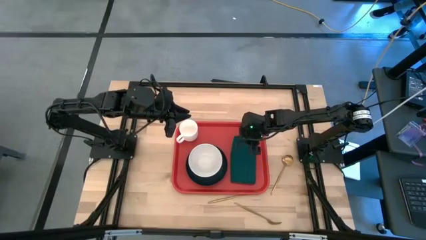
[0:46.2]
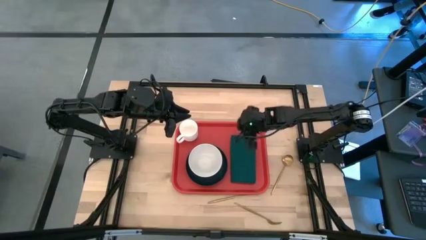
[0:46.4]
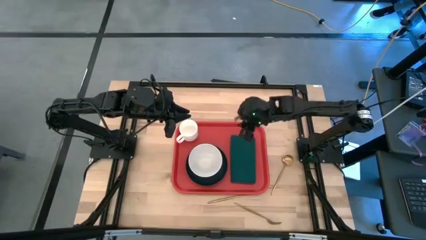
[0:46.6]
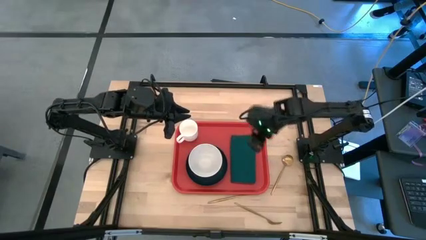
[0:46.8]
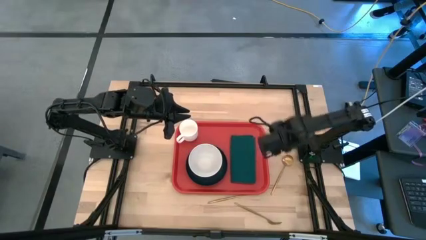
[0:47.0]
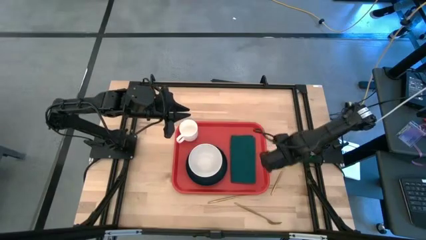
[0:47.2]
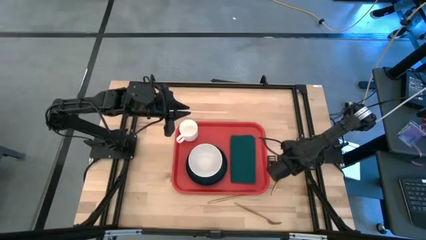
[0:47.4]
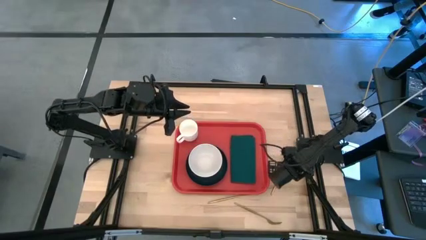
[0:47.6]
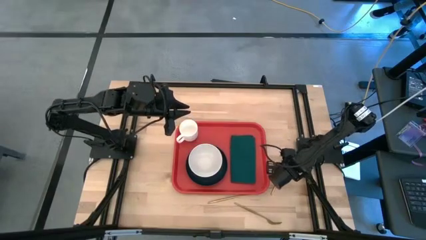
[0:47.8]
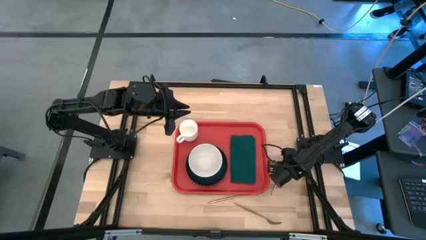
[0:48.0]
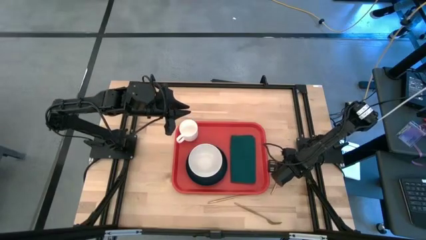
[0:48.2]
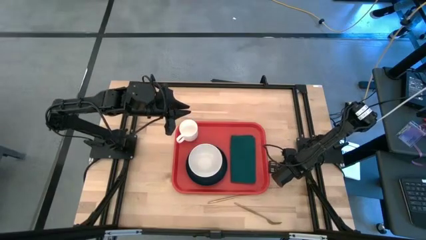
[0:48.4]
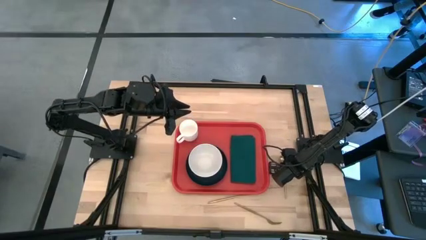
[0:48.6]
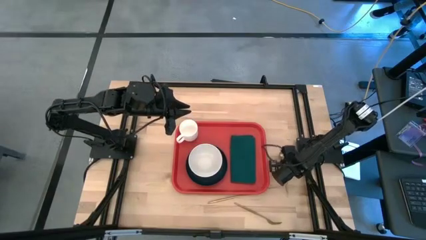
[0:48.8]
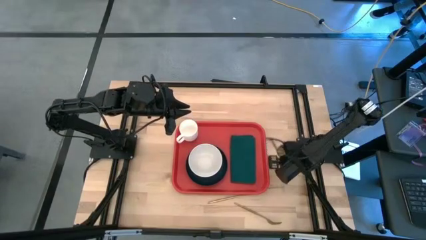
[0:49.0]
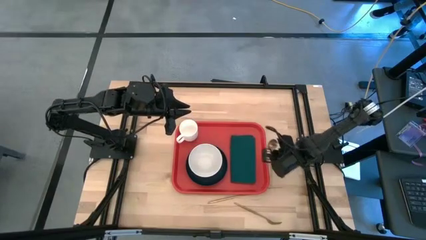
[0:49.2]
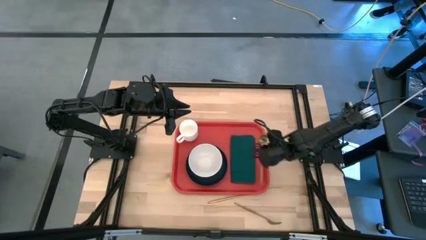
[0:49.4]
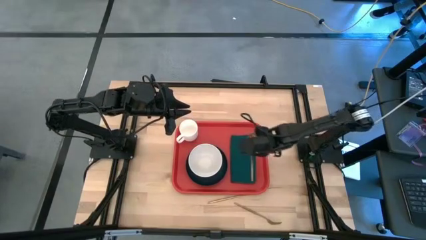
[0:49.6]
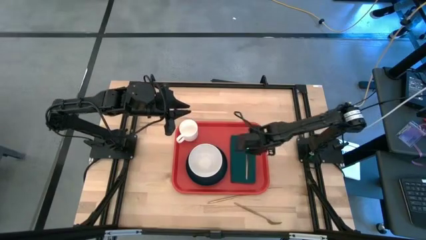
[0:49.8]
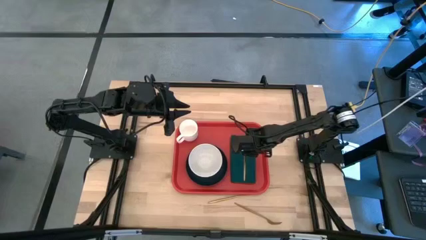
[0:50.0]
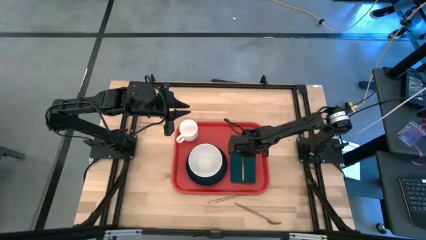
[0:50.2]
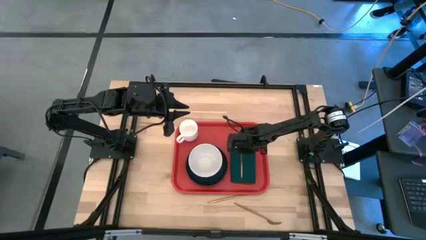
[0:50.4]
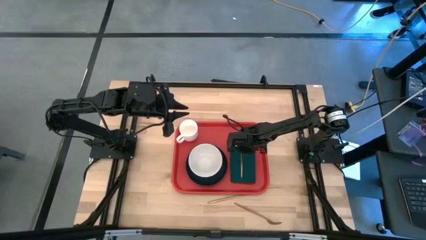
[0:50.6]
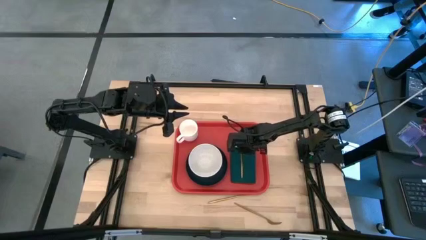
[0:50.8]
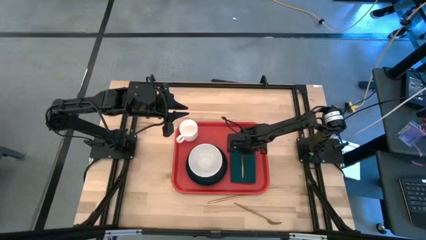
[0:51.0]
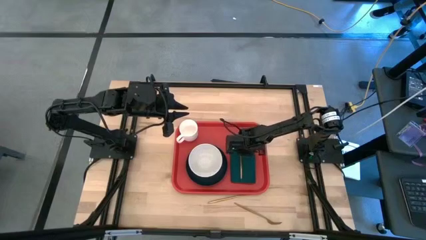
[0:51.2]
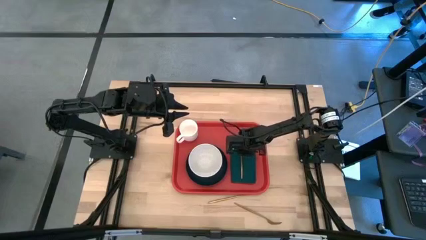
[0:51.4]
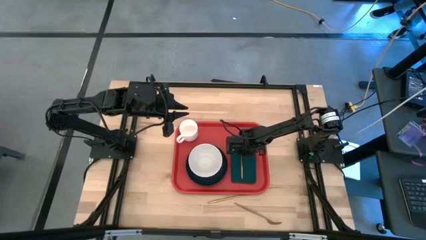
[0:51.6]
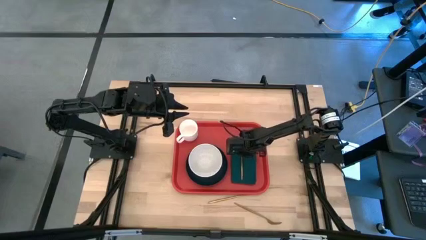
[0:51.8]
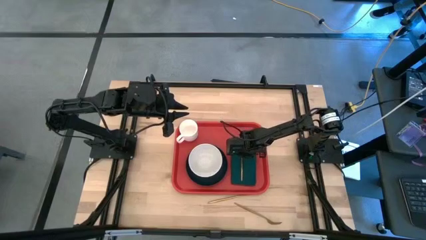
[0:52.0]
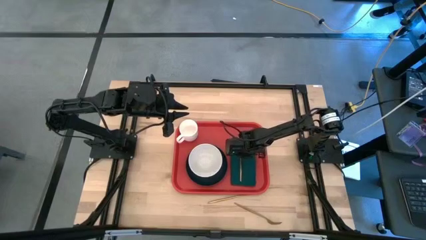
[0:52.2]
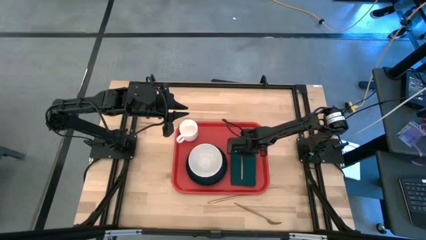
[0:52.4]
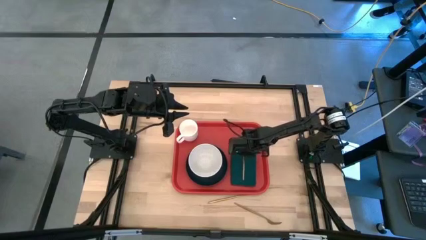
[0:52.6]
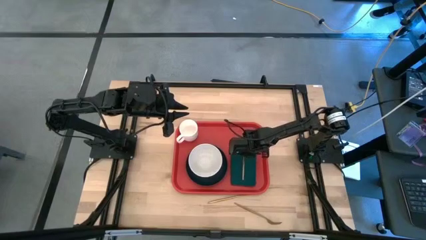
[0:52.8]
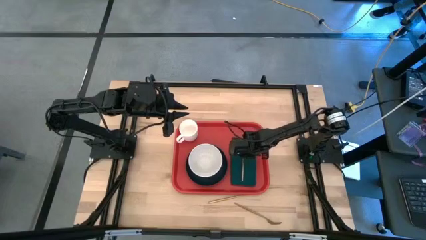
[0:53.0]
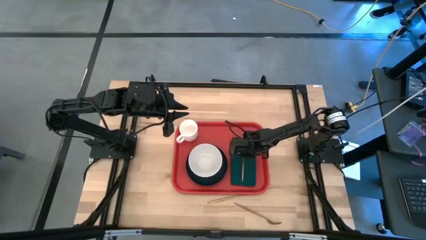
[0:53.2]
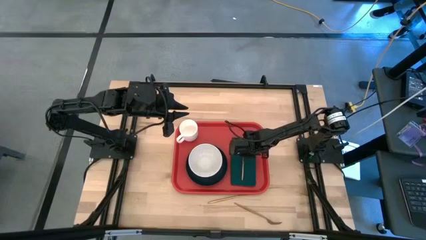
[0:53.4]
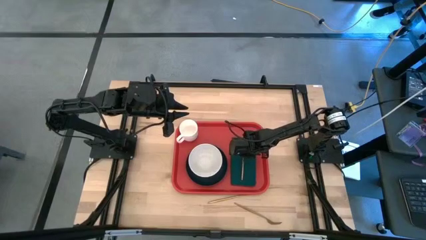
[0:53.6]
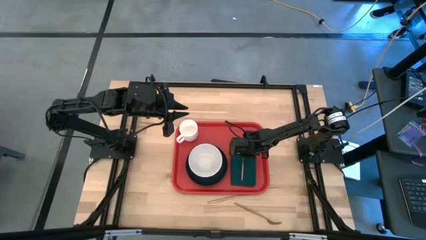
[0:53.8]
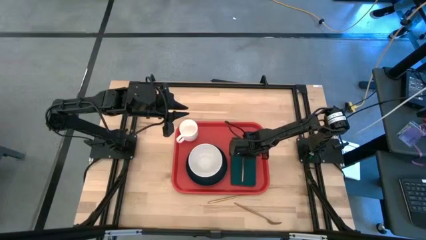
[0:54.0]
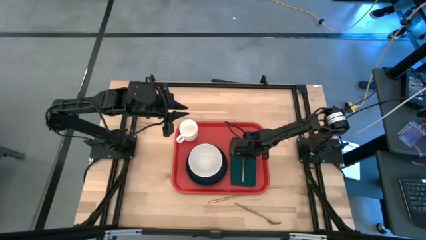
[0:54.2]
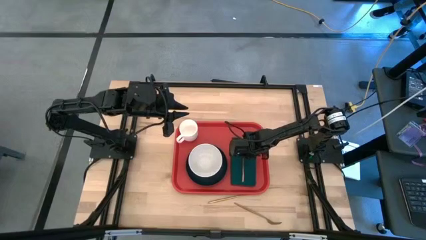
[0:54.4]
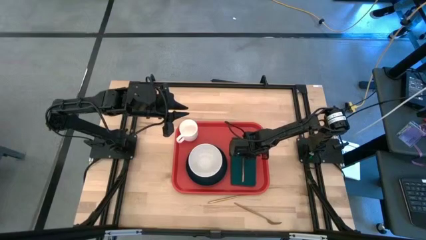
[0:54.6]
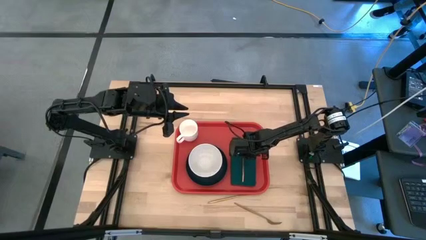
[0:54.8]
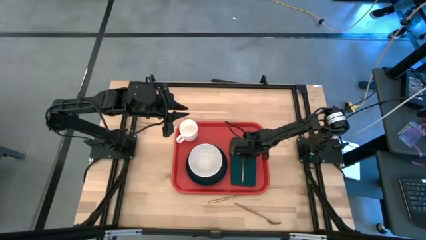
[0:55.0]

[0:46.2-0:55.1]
Task: Set up tray
Put the gold spoon to the right of the black plate on the green napkin on the red tray

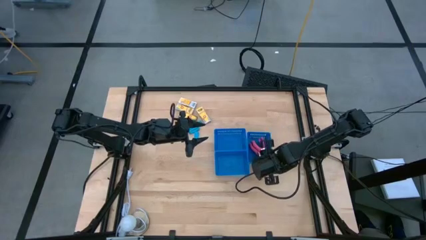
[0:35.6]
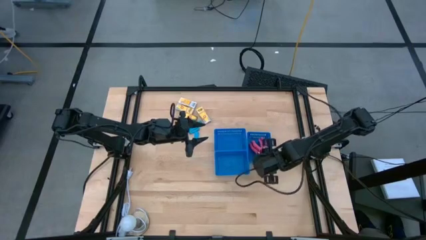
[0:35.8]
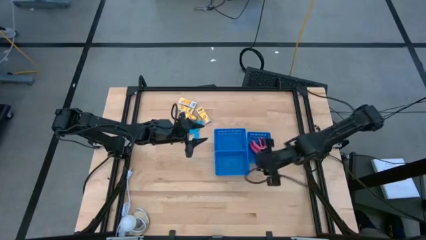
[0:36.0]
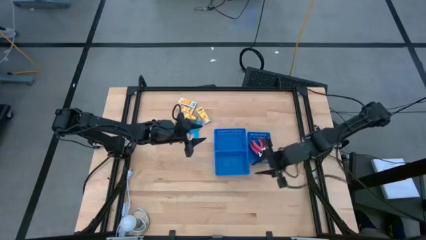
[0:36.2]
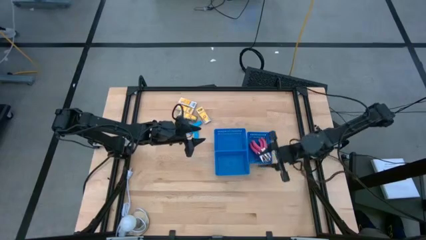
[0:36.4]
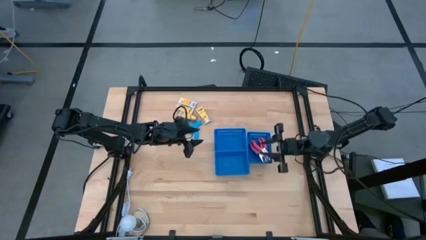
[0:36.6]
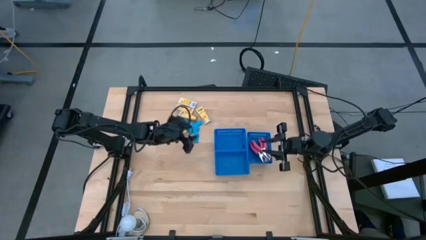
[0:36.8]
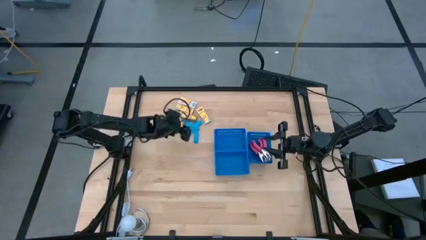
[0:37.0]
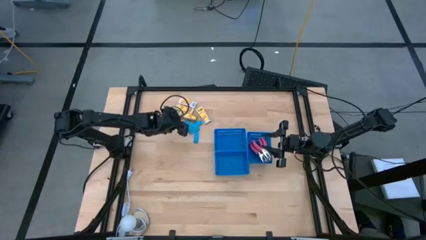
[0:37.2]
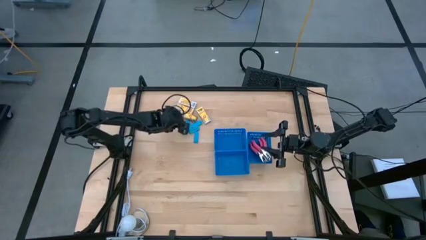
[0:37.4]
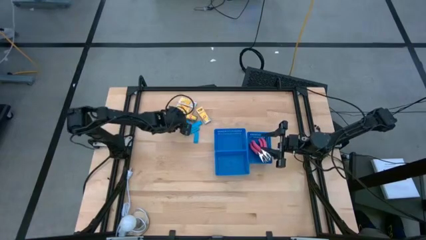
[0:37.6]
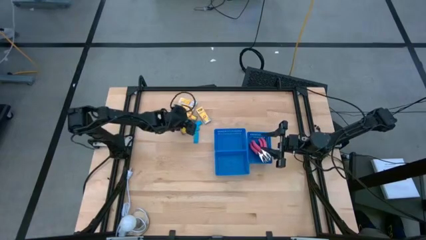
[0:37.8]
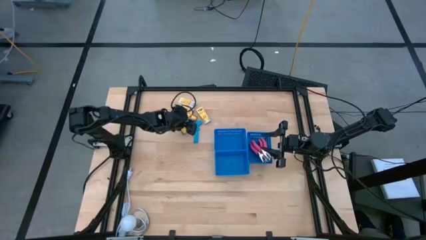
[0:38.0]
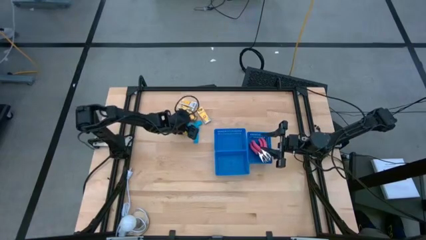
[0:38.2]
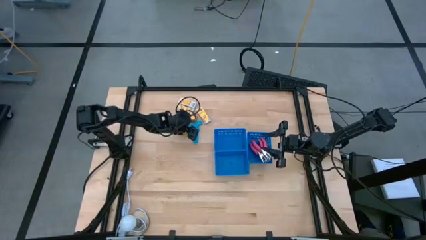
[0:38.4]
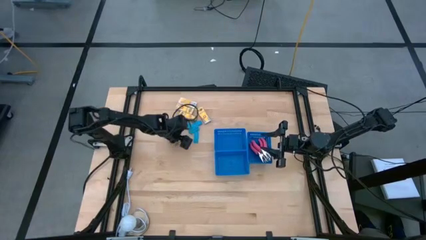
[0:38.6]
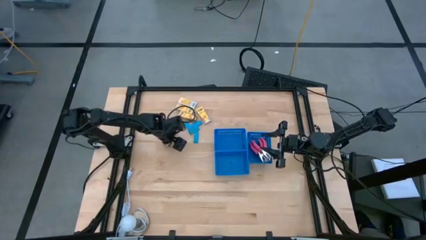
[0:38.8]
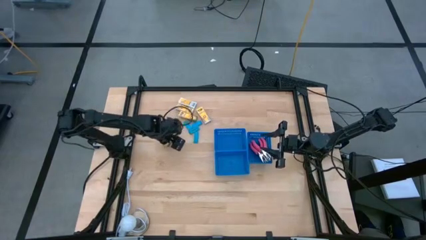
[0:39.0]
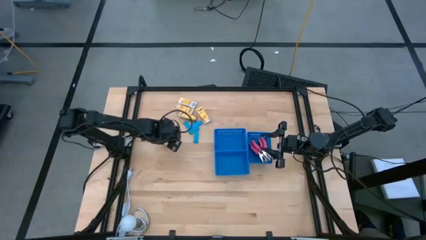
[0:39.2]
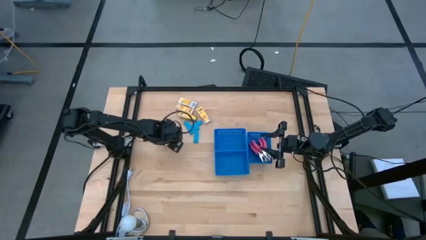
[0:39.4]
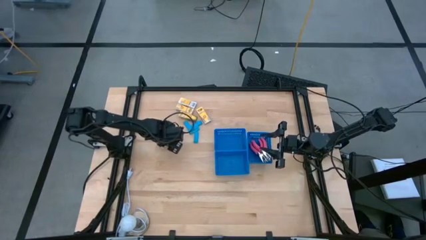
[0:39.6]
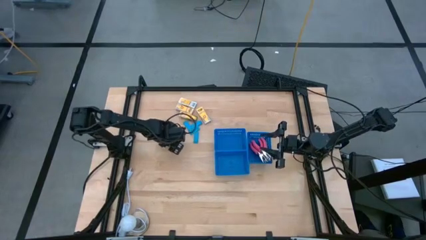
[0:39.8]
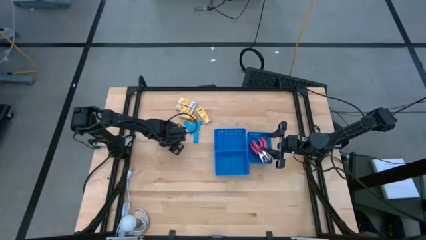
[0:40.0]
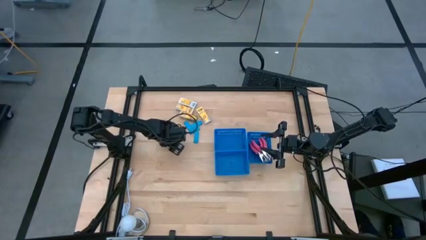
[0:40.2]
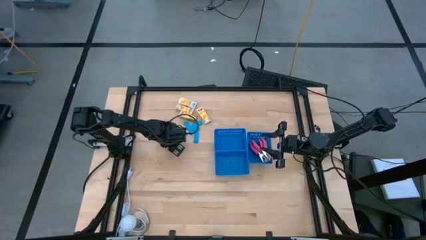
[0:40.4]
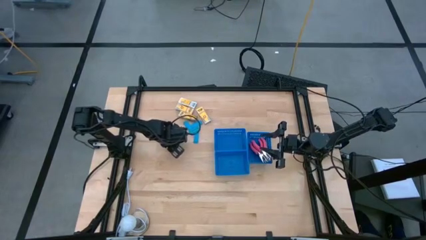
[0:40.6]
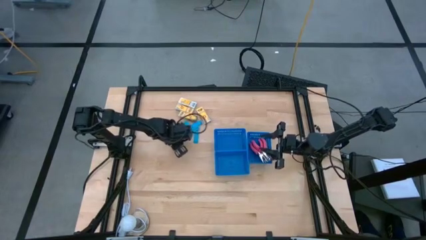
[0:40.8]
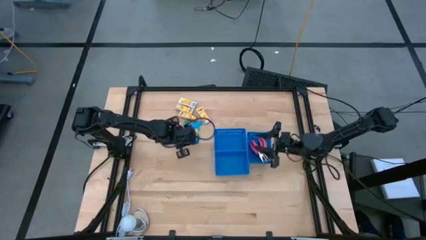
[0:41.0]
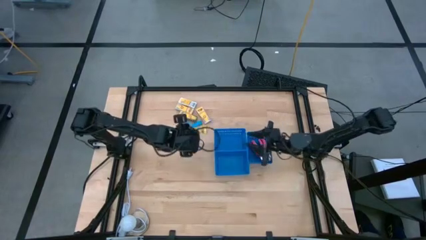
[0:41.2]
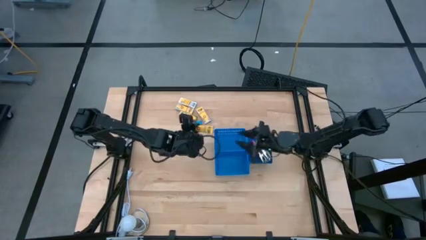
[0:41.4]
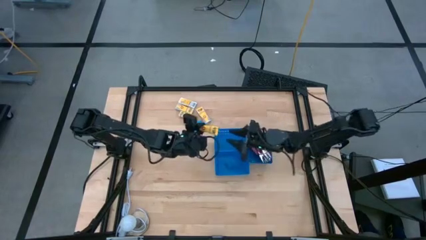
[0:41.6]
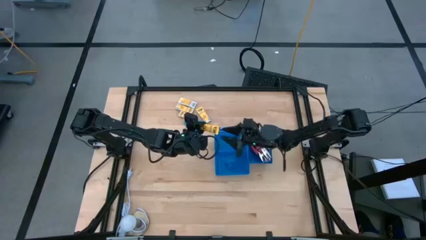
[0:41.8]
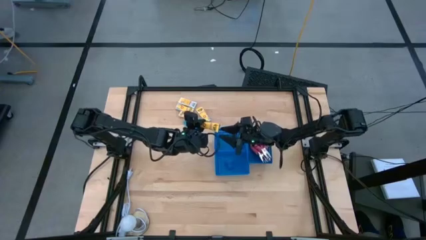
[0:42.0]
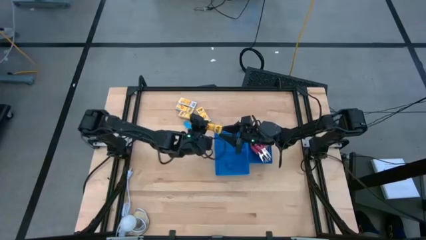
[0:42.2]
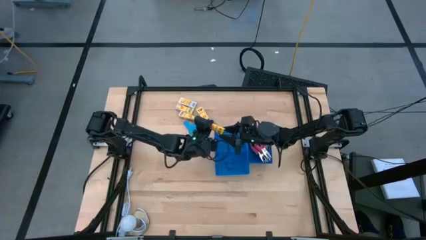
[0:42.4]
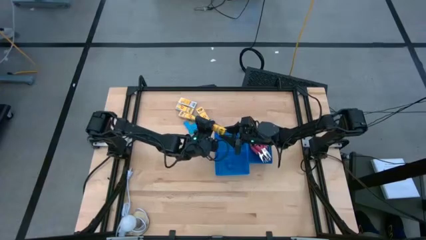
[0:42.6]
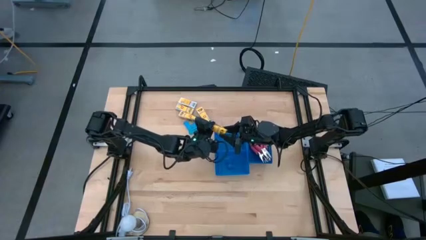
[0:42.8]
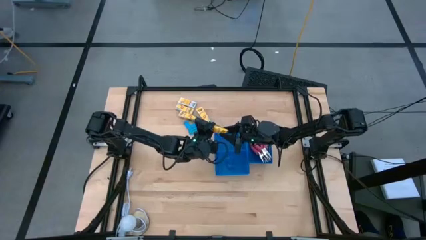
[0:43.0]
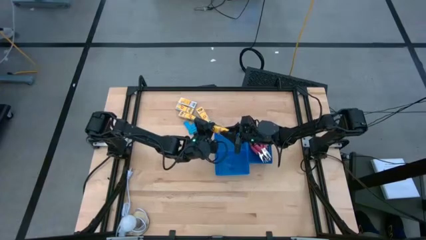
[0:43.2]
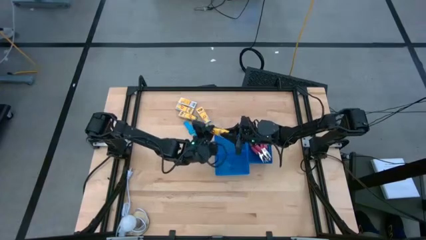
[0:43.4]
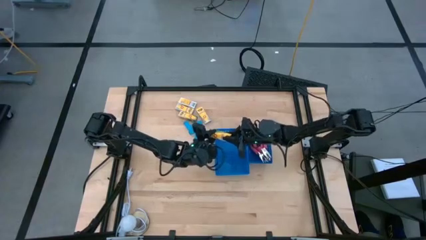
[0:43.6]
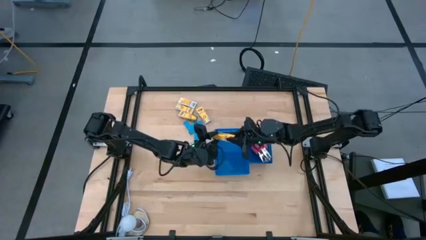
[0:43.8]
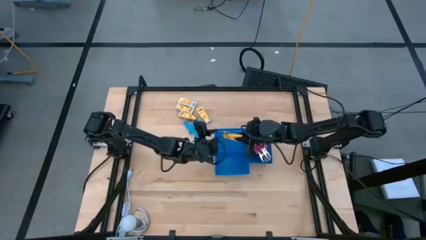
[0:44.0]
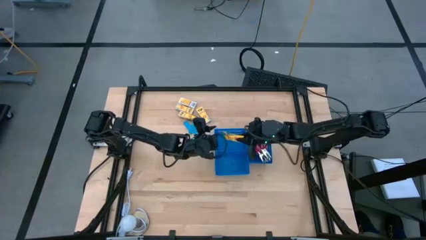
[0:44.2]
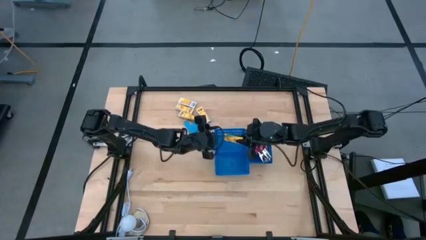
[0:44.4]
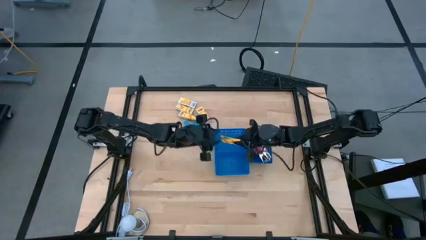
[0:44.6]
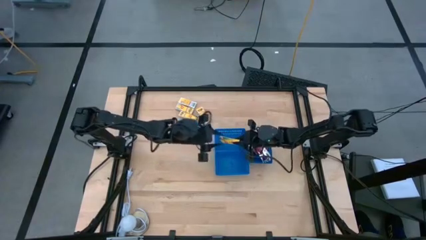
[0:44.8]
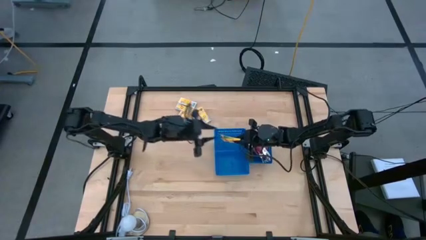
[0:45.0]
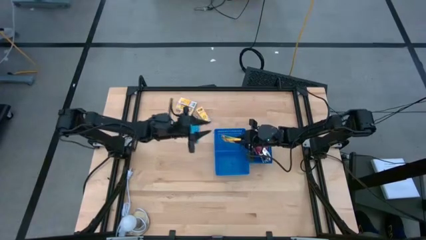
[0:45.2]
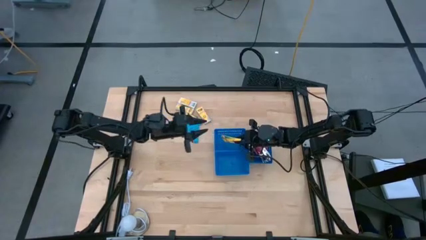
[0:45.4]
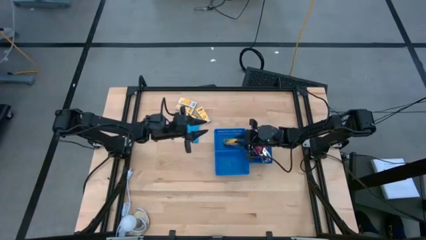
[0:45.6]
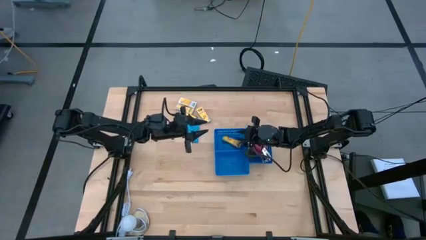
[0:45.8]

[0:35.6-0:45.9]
Task: Pick & Place School Supplies
Put the crayon box into the top horizontal blue bin
